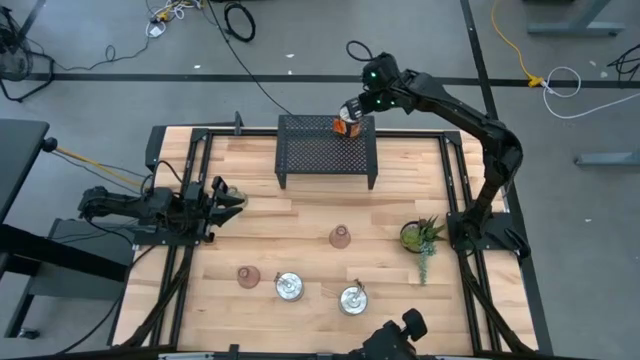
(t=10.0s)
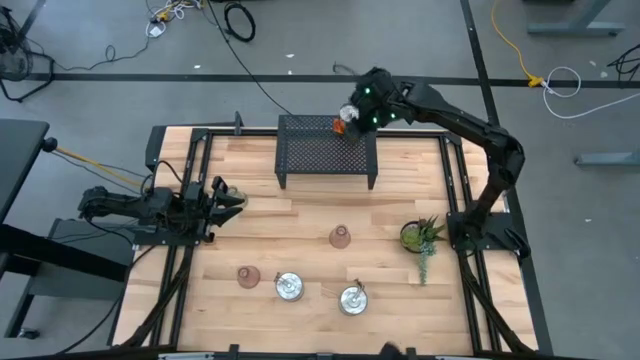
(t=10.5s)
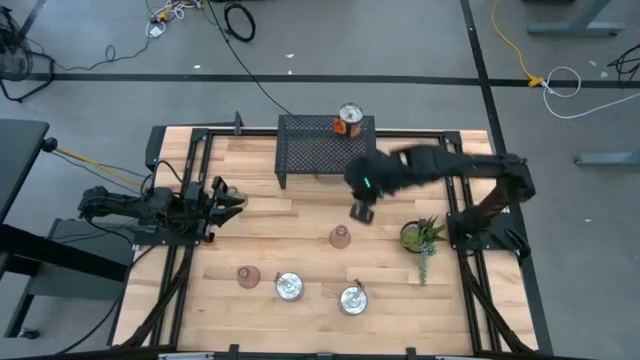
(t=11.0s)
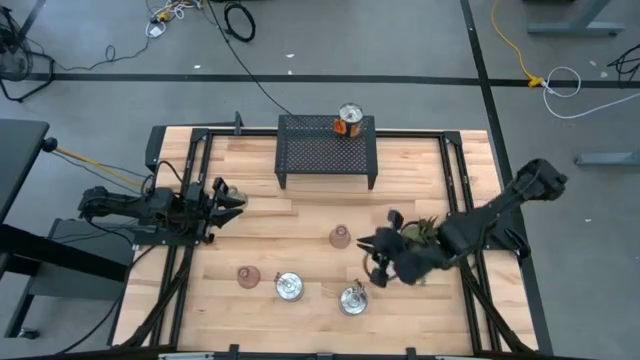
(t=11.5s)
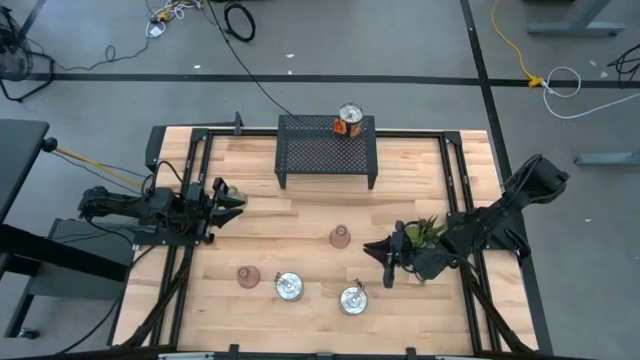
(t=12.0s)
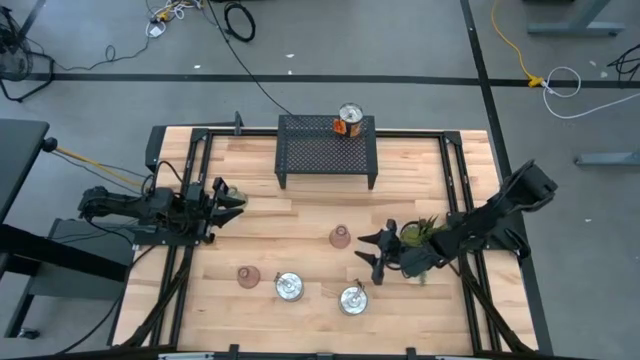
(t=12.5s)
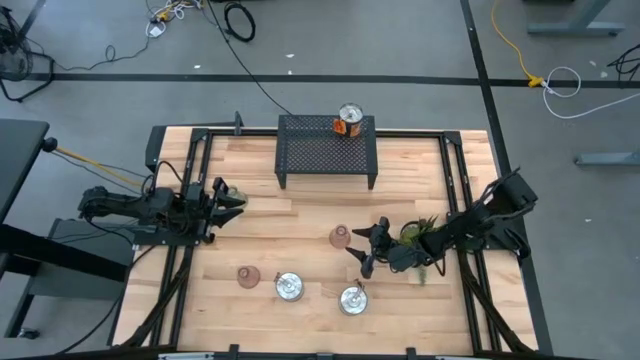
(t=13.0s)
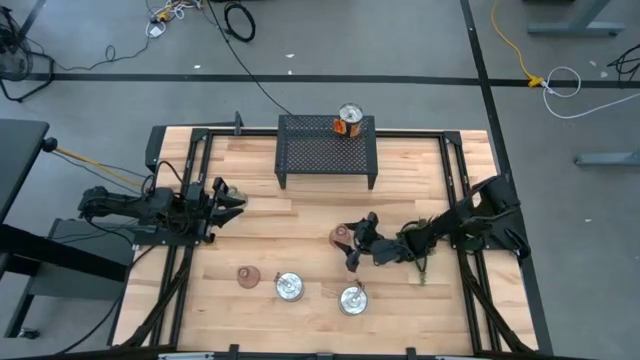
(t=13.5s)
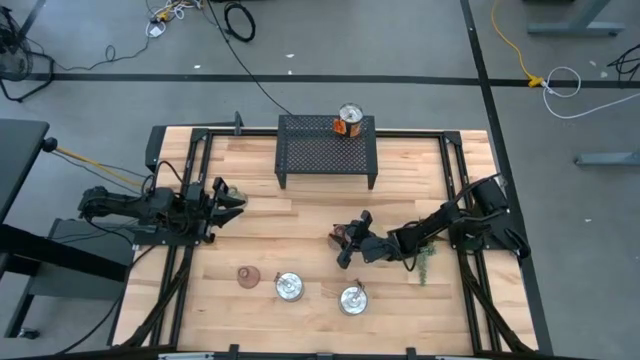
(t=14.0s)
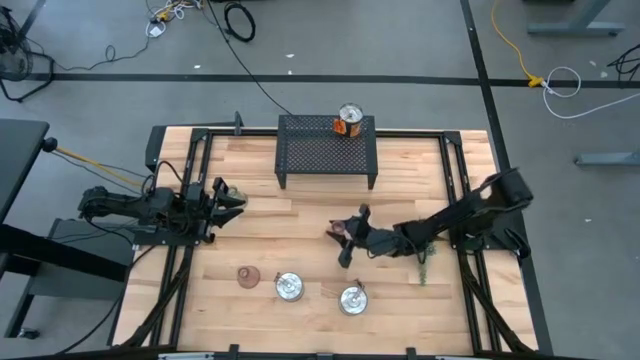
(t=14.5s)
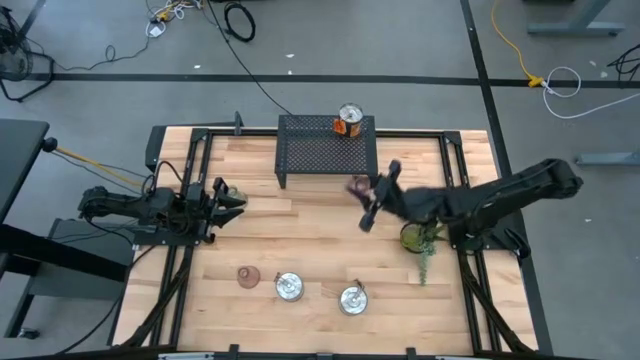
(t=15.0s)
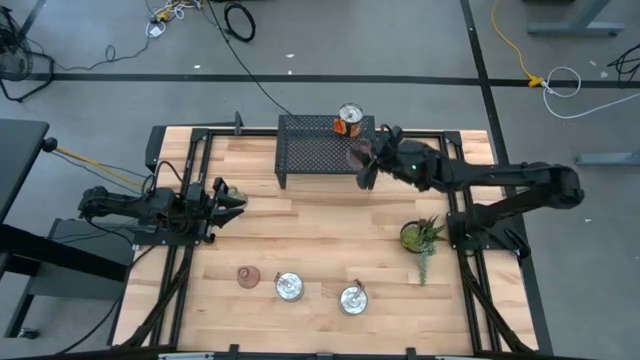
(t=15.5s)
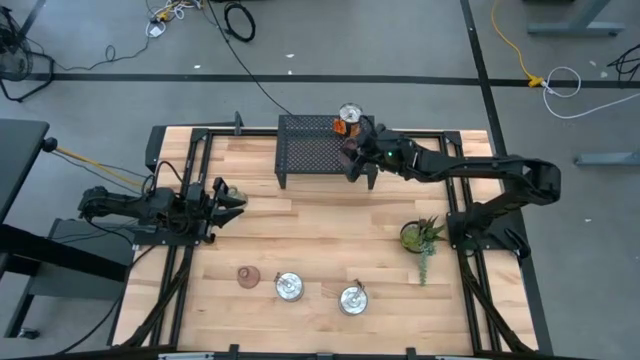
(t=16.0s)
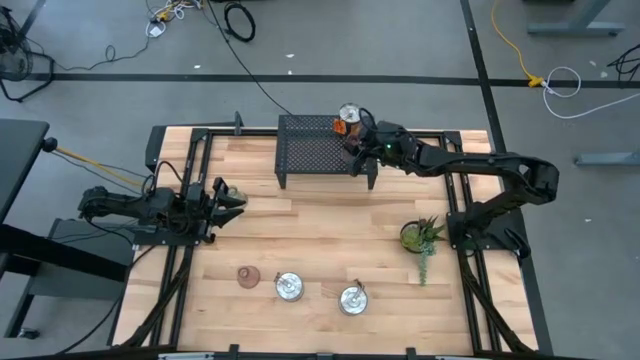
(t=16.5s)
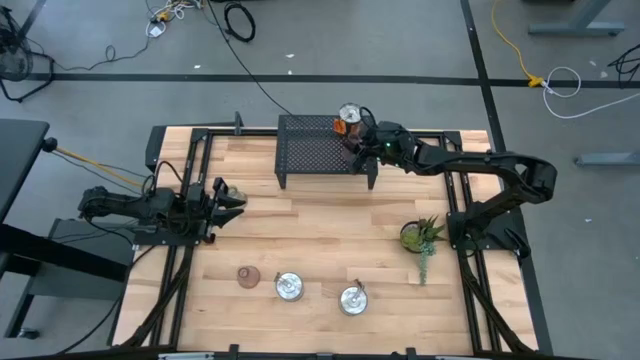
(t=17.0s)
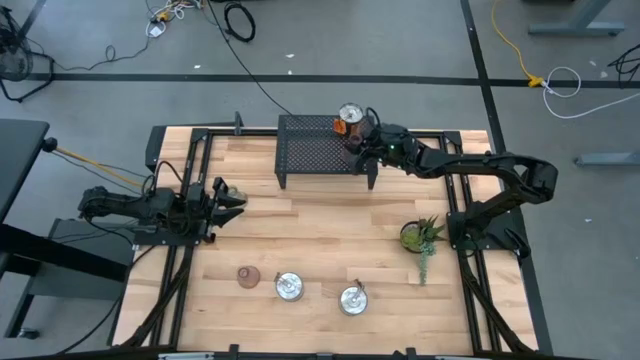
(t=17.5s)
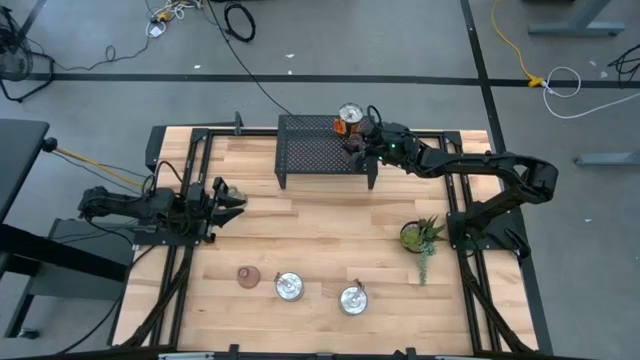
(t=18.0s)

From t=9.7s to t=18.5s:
Task: Pick & Place candle stick holders
Put the right pink candle holder on the shelf

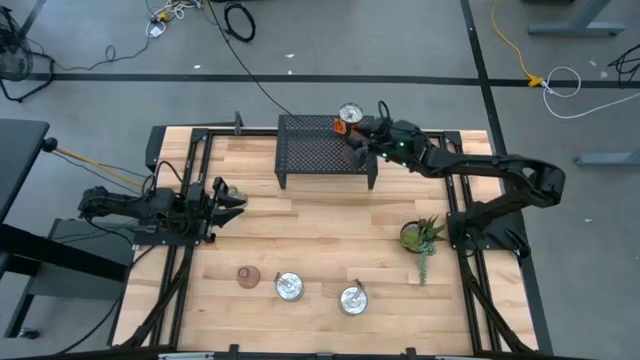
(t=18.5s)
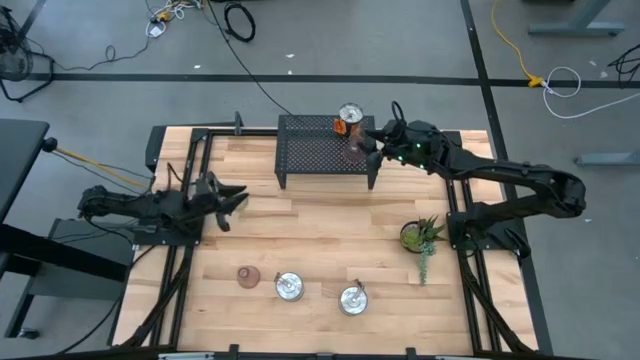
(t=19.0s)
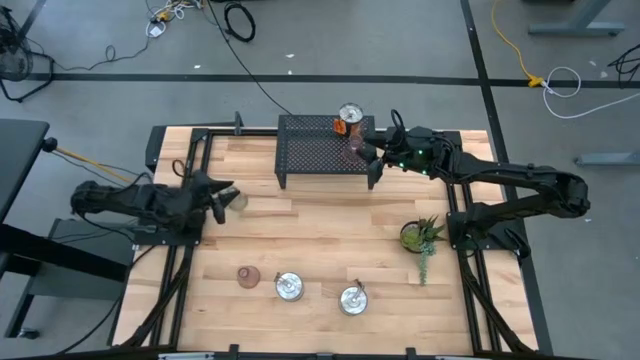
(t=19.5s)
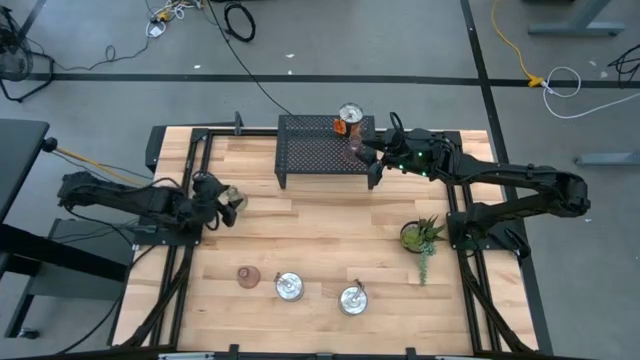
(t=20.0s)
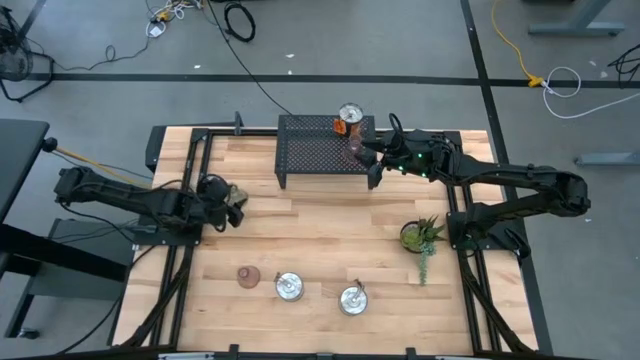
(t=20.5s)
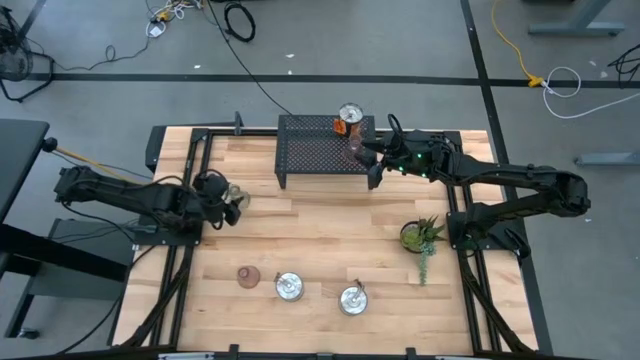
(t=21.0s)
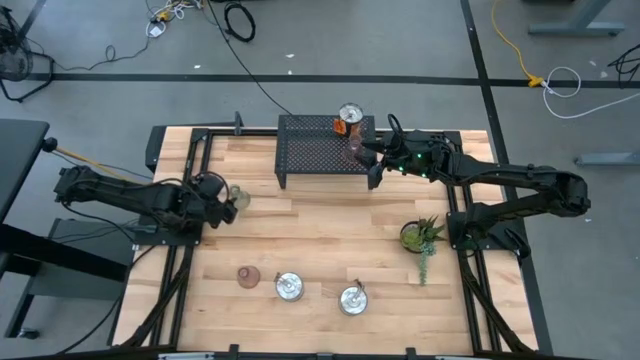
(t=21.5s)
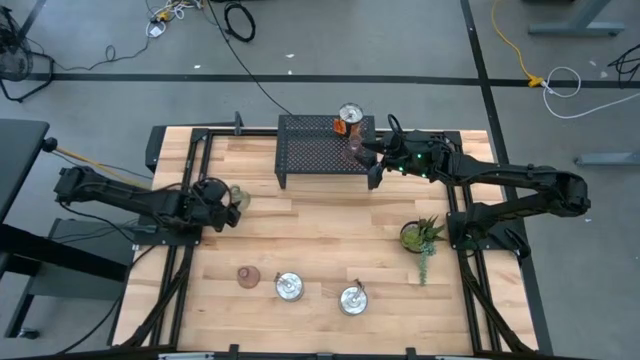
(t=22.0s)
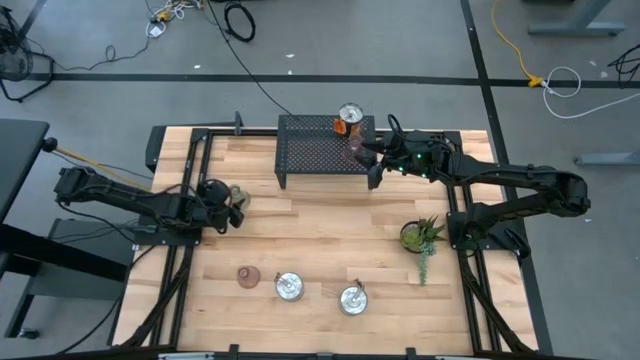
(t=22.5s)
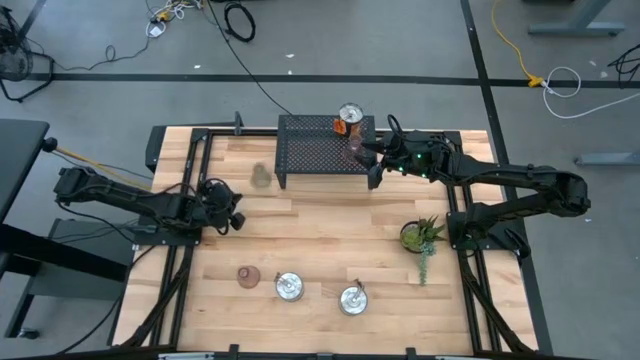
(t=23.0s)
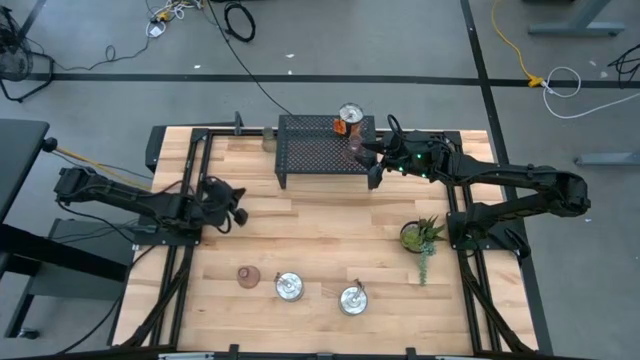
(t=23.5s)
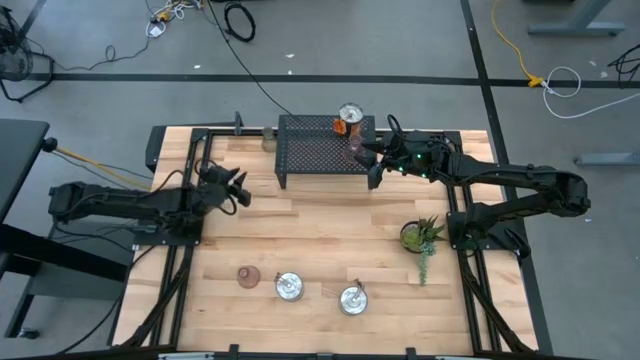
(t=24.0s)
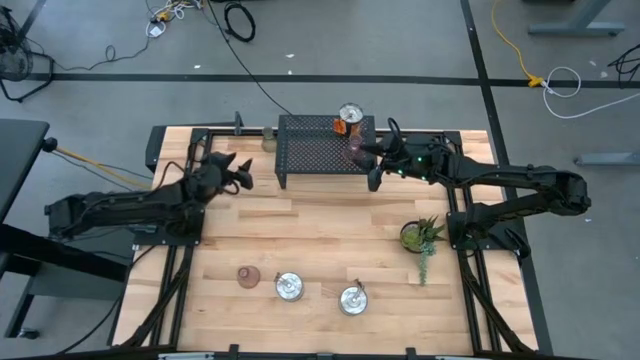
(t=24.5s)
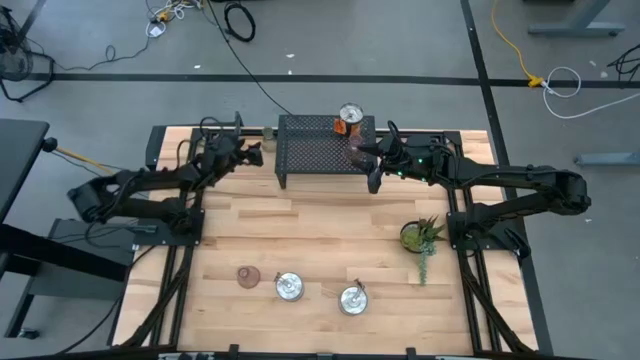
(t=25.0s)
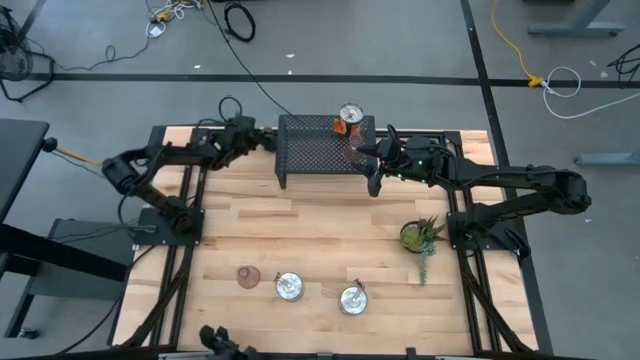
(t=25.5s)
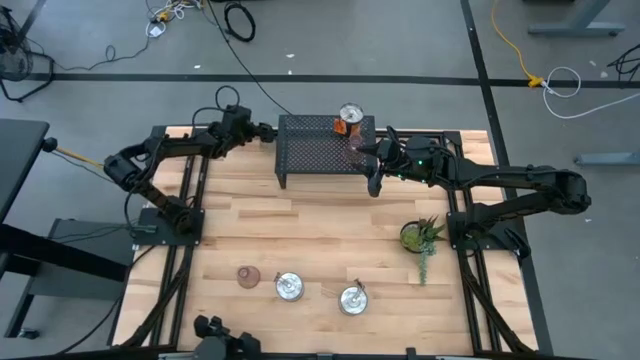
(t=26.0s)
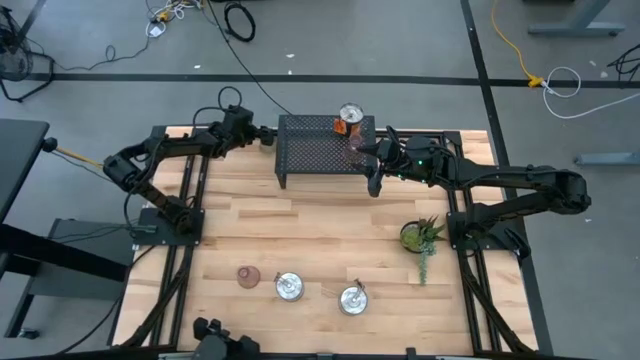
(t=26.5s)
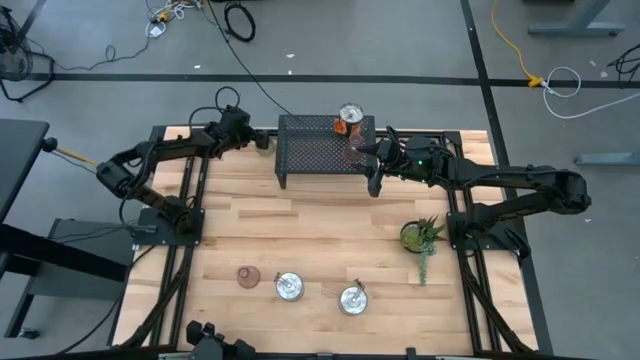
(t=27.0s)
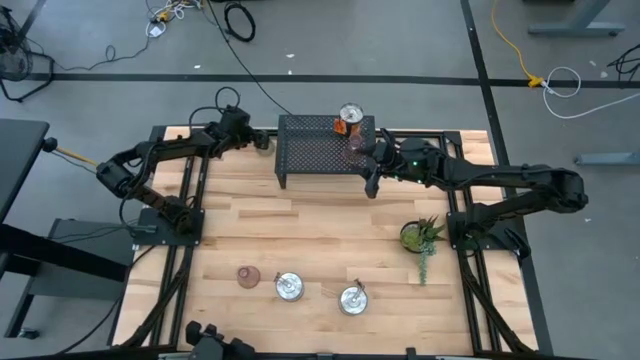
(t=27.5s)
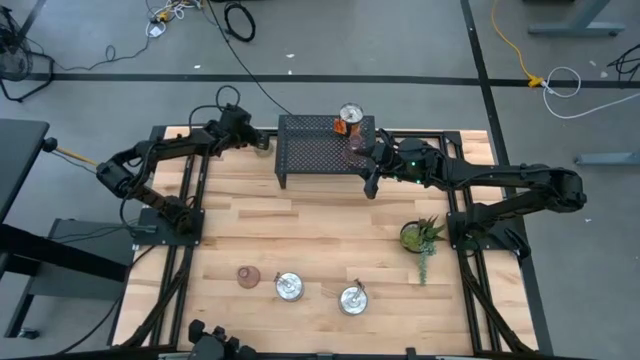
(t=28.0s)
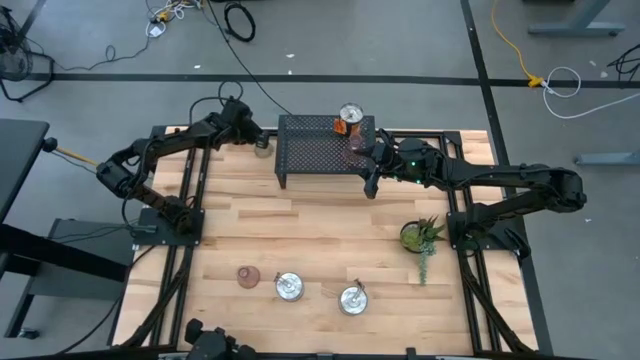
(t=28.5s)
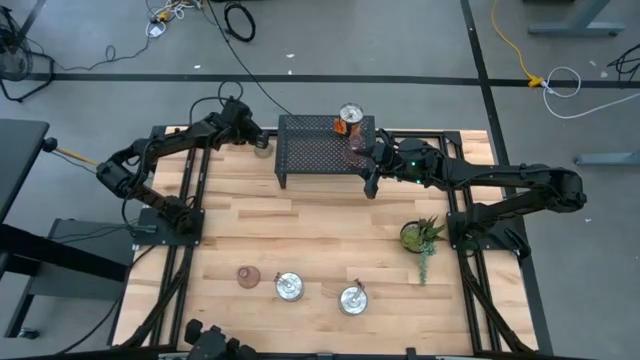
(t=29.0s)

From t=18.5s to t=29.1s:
Put the green candle holder on the shelf

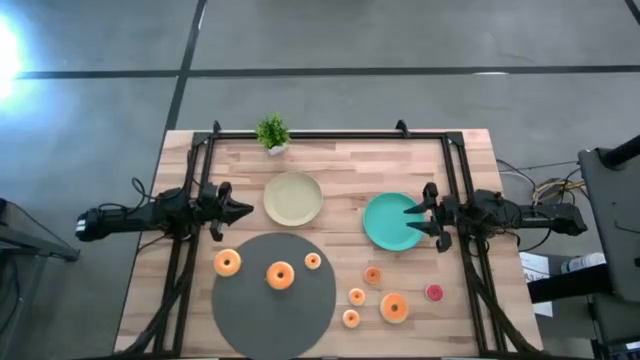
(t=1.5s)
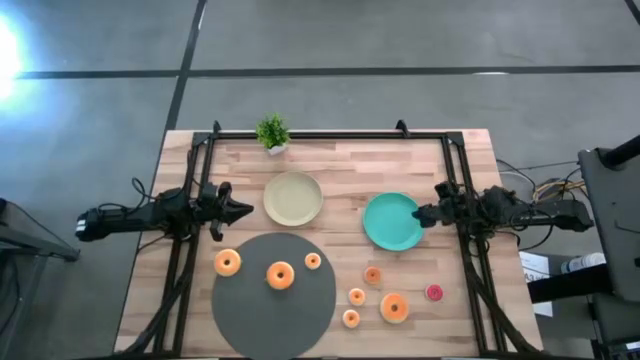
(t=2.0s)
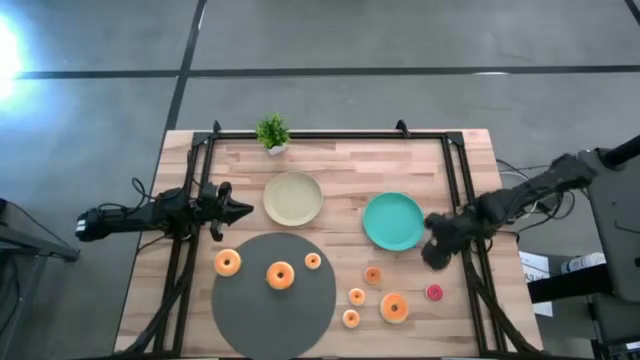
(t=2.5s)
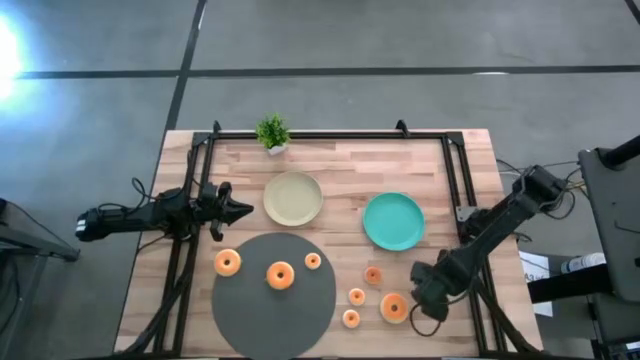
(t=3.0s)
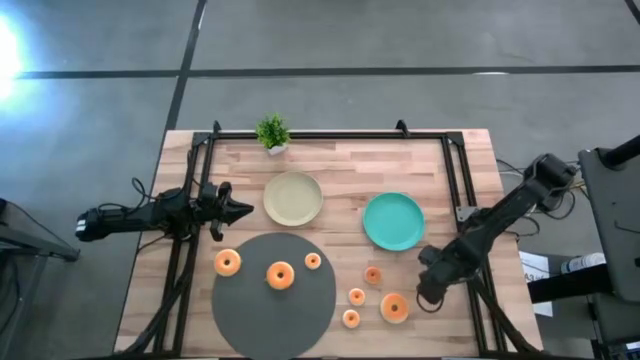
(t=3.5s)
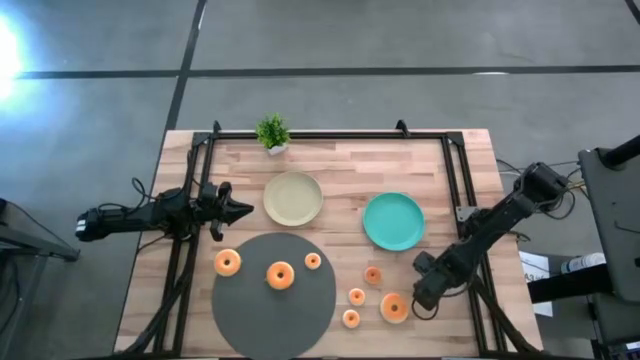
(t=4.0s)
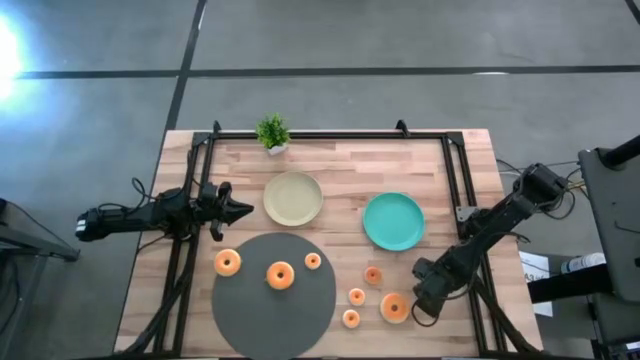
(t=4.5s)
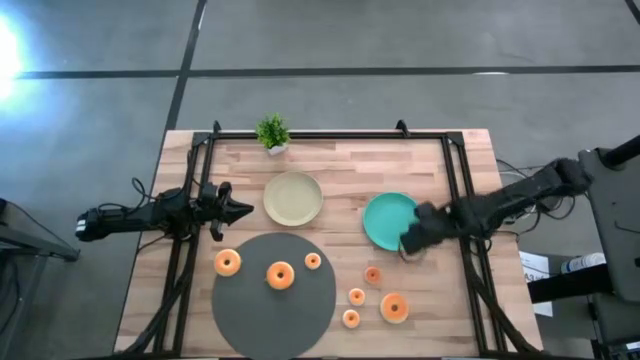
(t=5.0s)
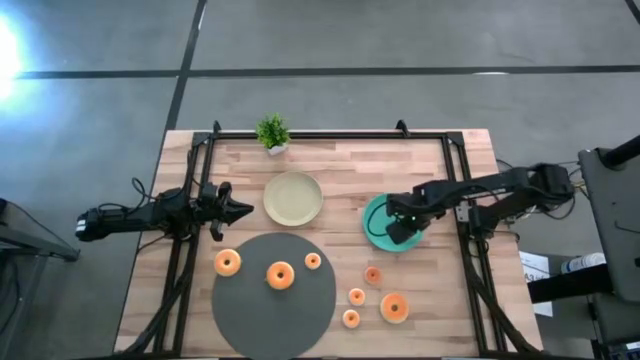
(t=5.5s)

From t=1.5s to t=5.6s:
Task: Pick & Place donuts
Put the small red donut on the blue plate
